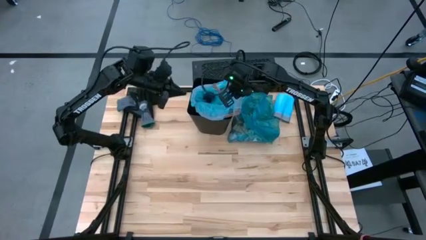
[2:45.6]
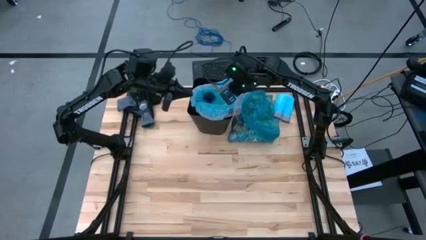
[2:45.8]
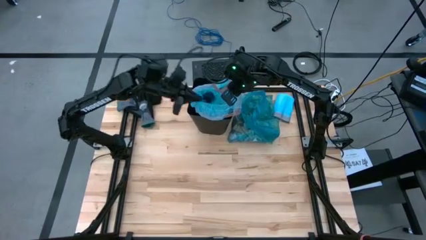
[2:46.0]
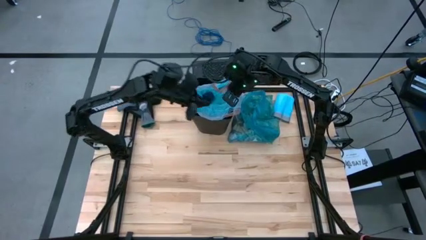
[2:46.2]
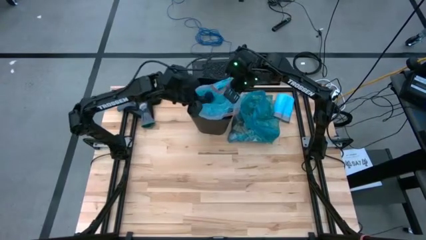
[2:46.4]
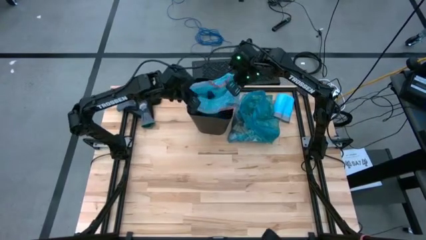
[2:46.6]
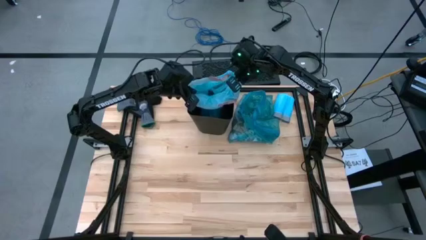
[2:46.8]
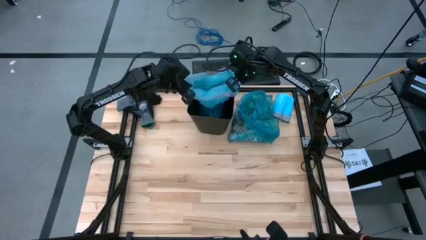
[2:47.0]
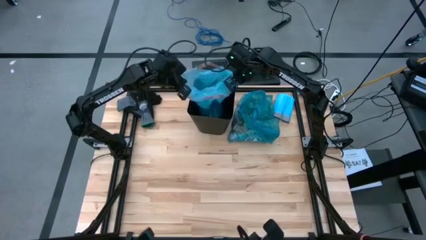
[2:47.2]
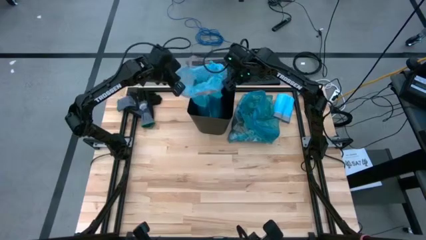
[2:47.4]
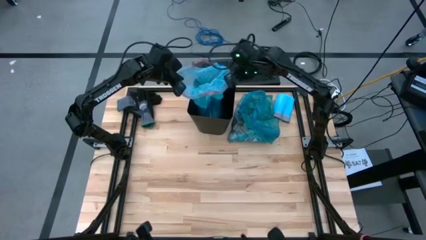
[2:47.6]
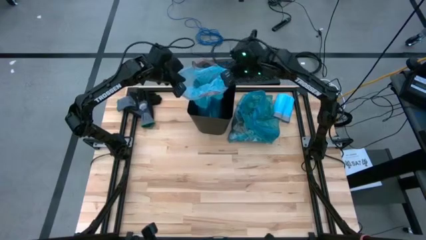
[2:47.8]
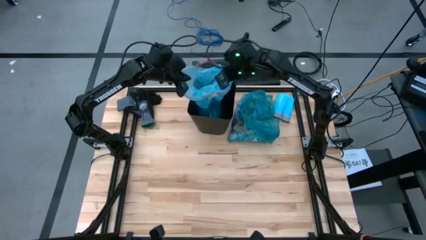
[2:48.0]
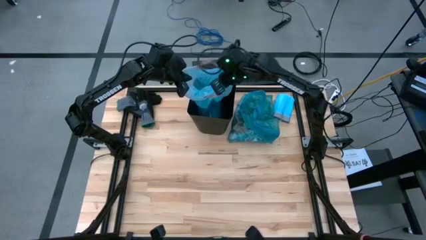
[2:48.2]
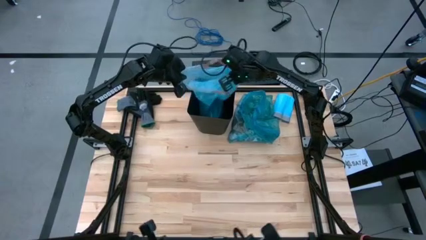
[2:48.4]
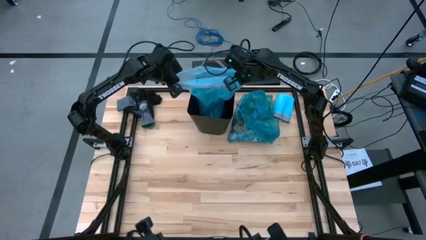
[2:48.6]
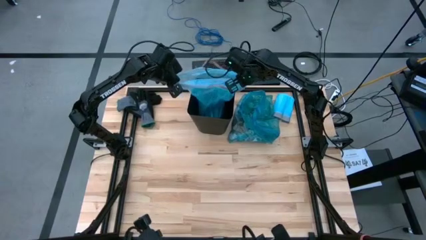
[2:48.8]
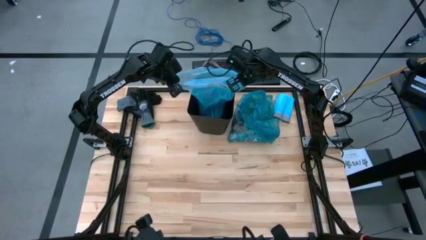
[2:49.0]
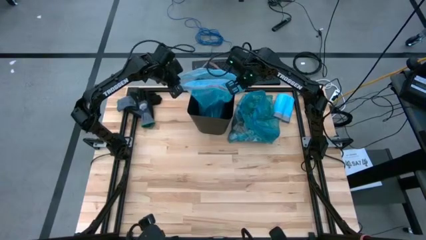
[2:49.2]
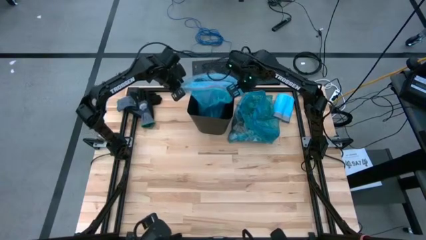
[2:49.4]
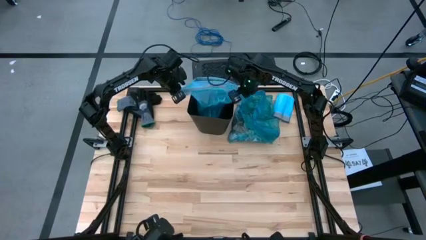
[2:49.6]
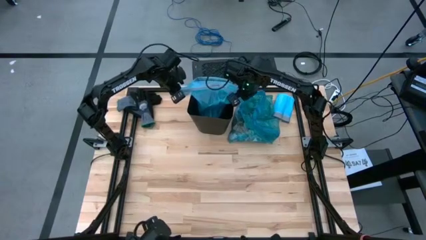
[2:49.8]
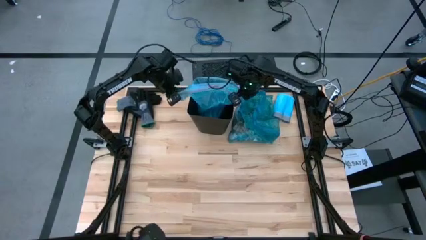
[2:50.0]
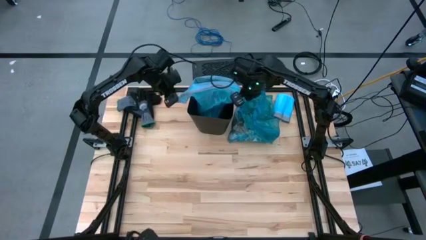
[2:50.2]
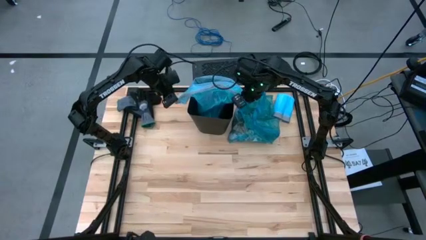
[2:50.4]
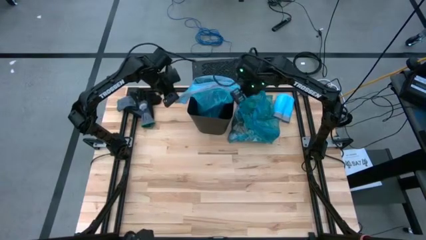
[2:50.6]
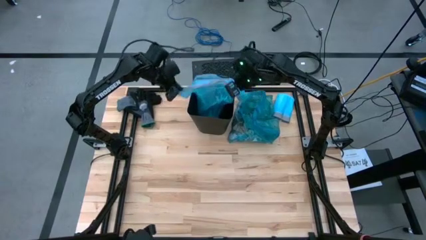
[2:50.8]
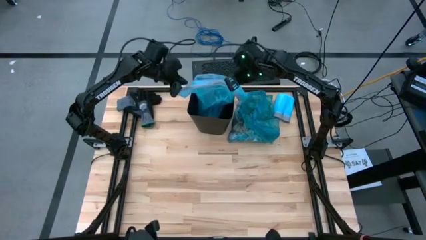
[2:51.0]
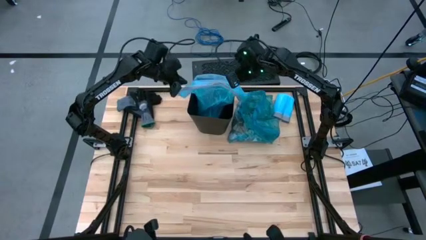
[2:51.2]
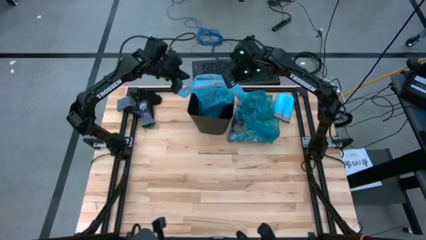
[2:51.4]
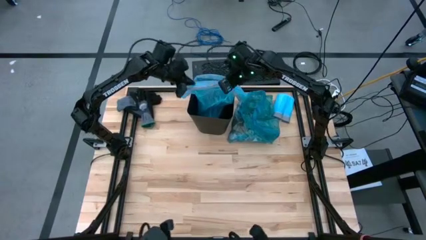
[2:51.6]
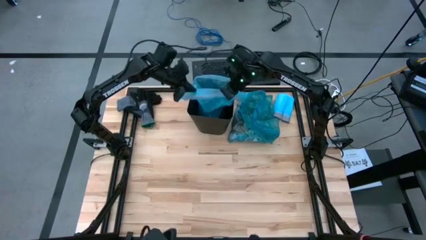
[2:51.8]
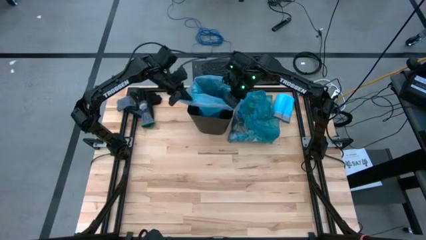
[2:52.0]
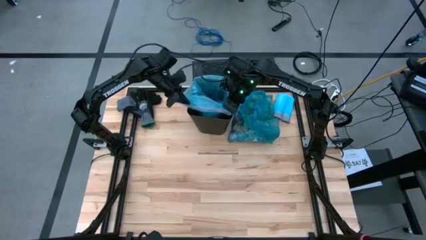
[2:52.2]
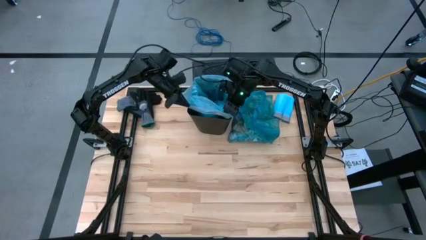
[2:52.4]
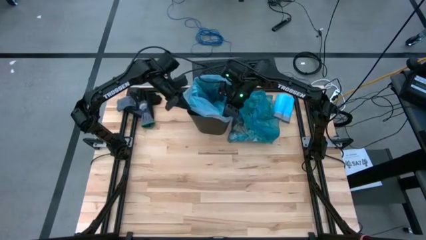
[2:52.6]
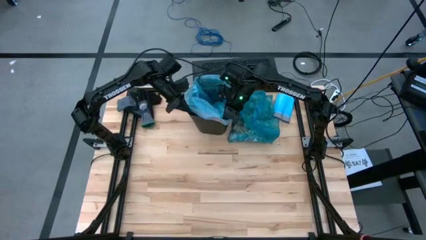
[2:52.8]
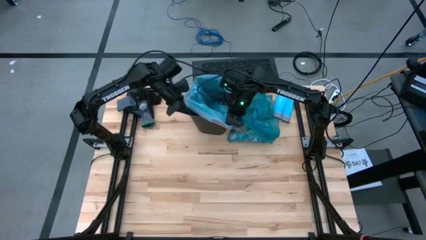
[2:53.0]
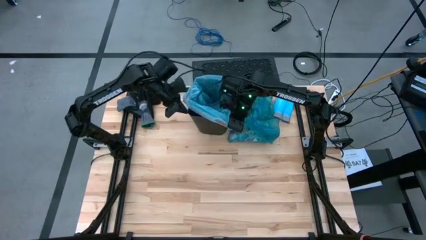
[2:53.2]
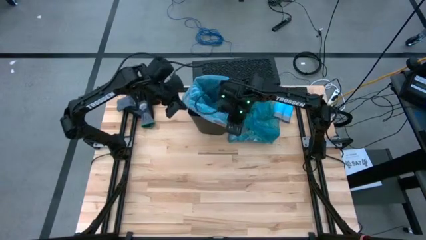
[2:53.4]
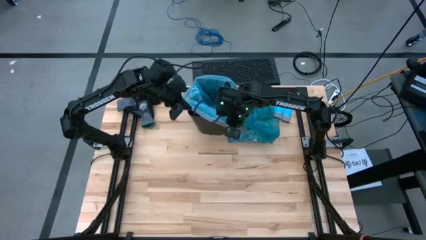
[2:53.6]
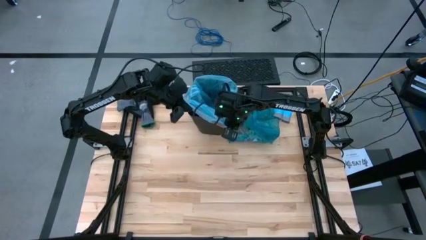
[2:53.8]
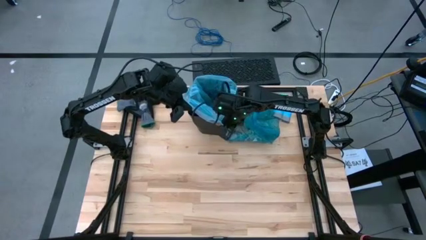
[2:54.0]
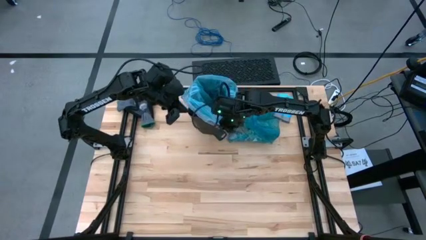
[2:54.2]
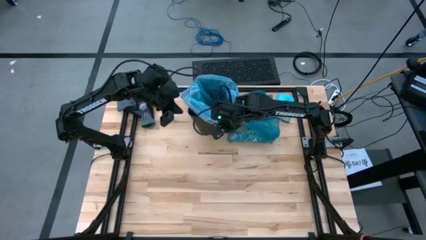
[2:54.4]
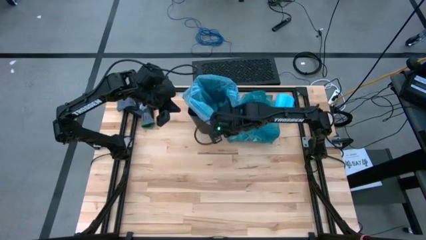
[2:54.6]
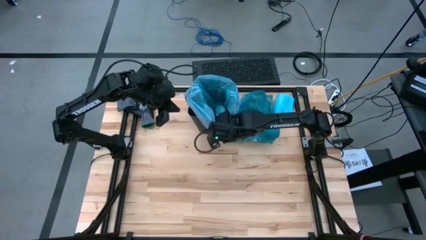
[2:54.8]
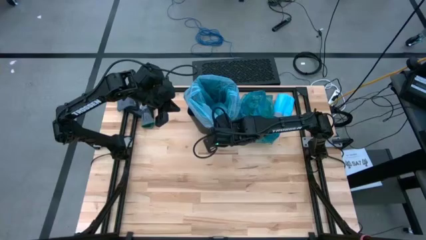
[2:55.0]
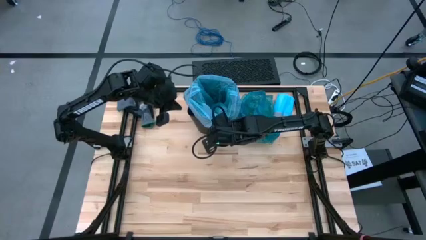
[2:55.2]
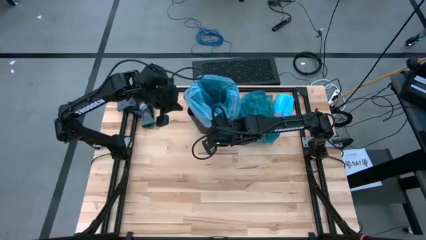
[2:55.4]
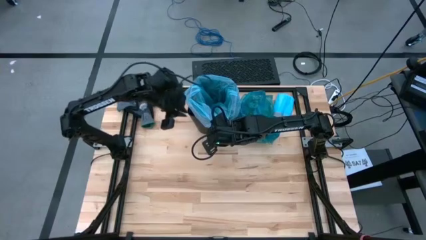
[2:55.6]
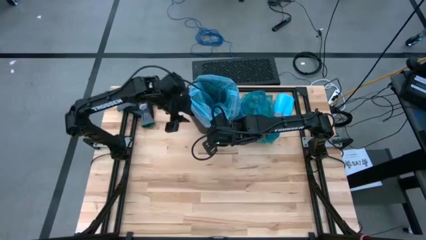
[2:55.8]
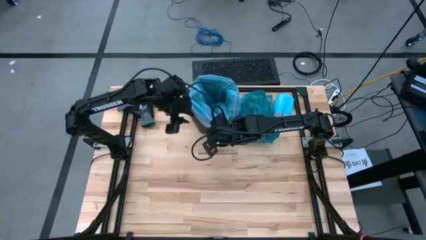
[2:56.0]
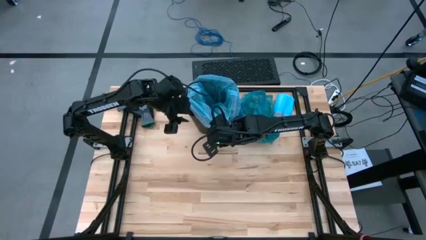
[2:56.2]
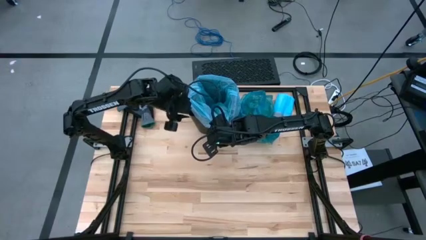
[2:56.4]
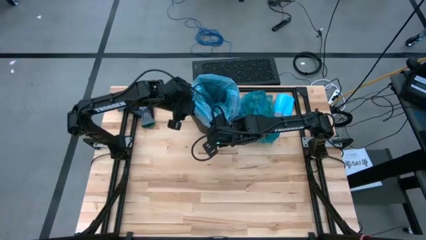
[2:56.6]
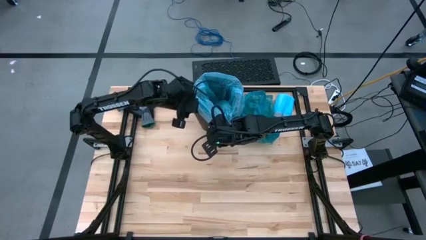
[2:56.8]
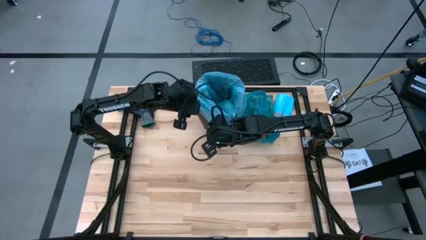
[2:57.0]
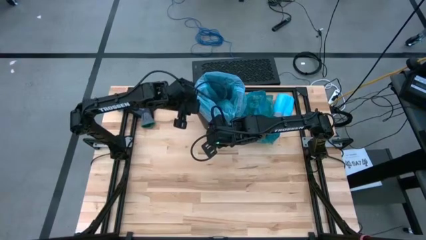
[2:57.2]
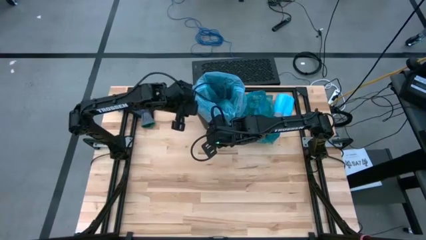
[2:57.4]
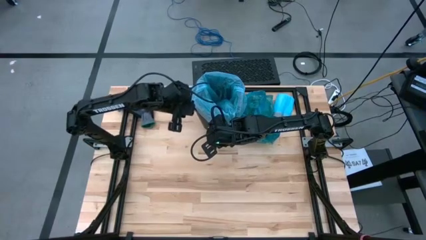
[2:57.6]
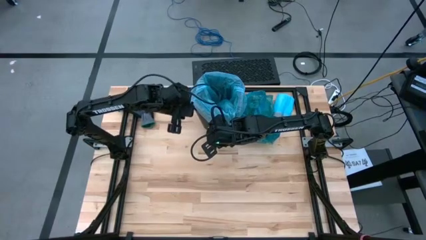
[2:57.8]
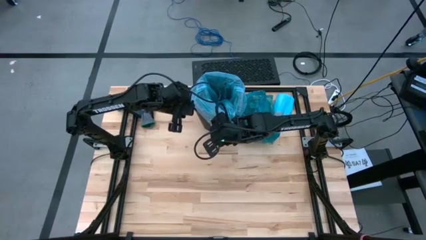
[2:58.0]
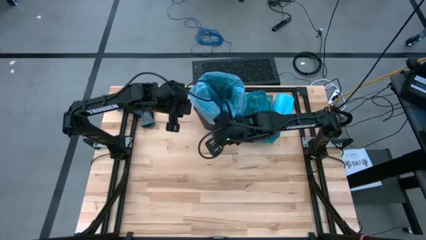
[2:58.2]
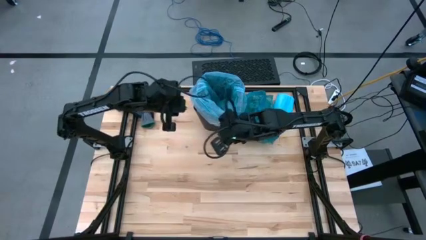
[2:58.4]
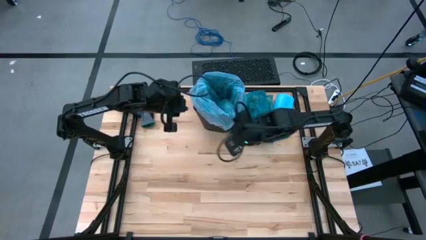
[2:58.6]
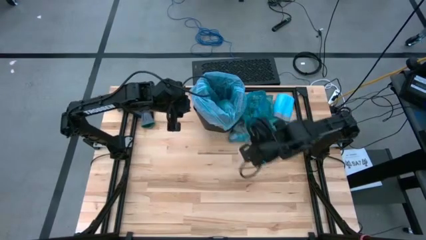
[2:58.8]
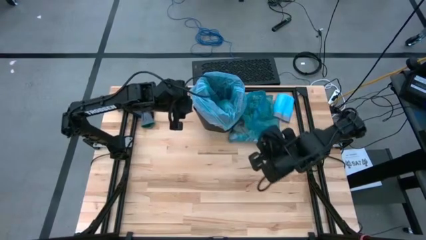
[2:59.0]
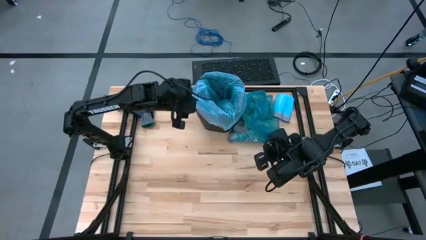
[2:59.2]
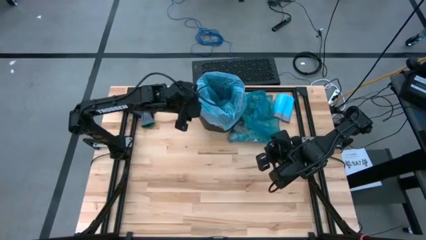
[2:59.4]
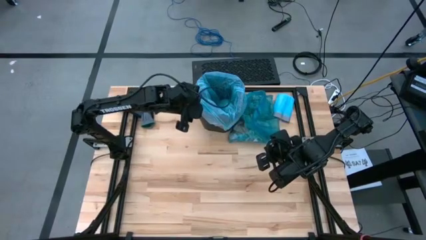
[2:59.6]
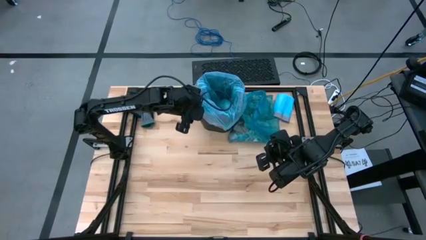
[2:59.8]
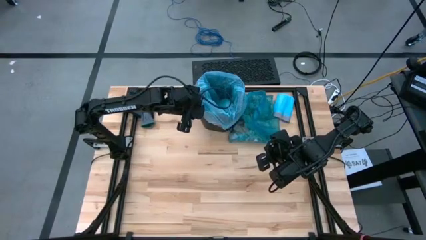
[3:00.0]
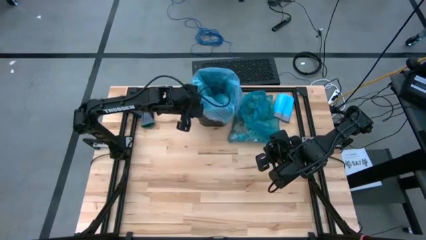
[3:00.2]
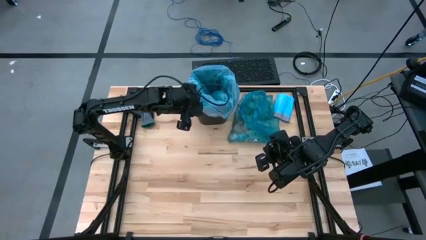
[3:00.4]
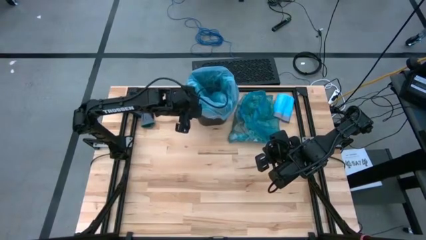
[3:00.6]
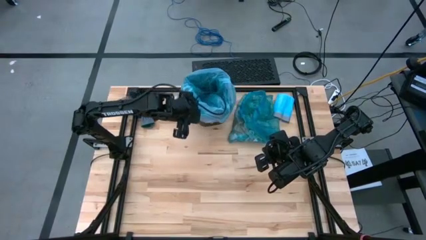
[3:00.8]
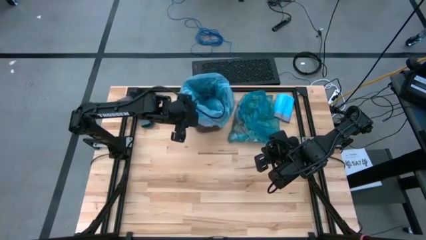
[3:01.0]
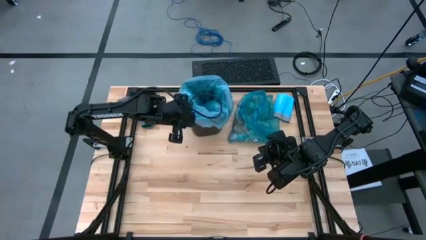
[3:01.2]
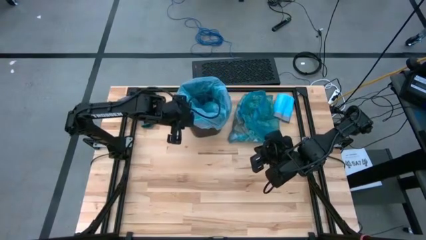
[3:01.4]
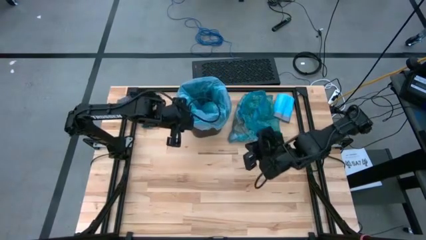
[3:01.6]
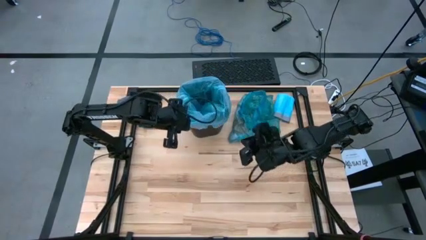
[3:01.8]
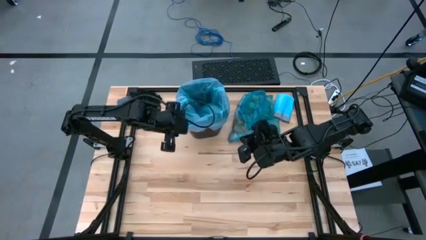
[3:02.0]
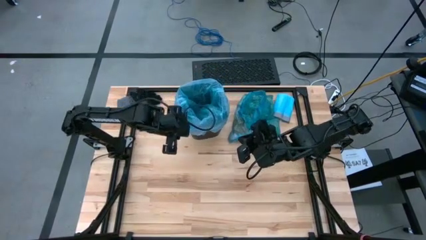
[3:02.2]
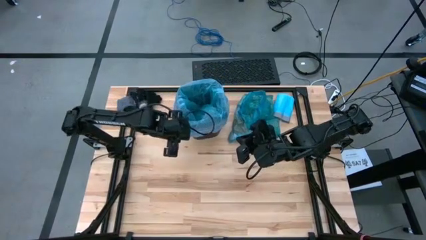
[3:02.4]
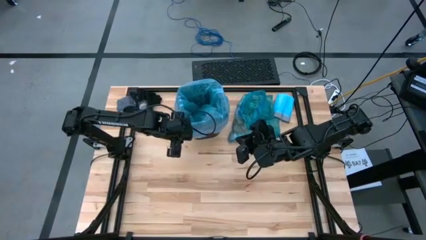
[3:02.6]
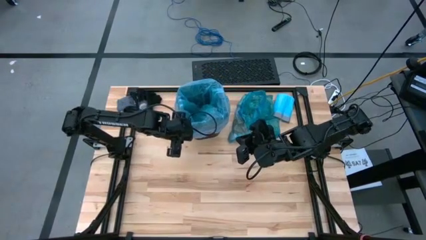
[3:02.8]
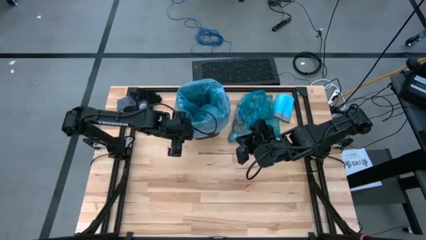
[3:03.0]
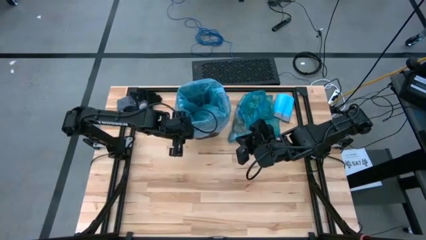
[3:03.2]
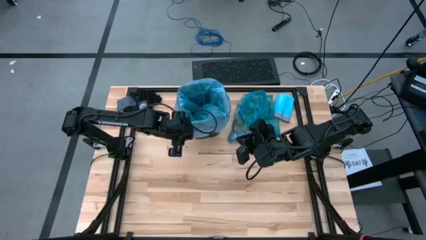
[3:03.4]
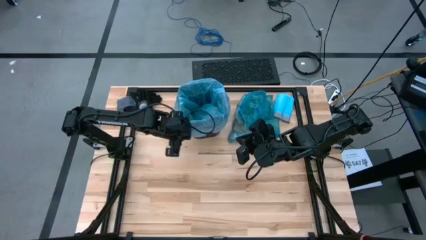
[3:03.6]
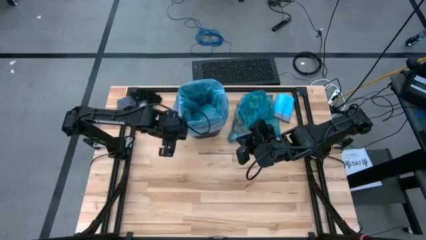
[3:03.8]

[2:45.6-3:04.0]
Task: place trash/remove bag and relplace
Insert the light blue trash bag into the bin
